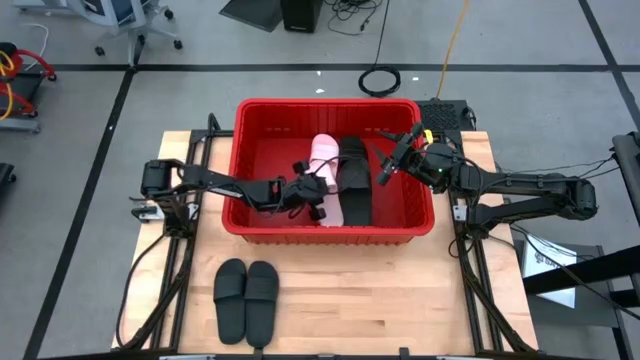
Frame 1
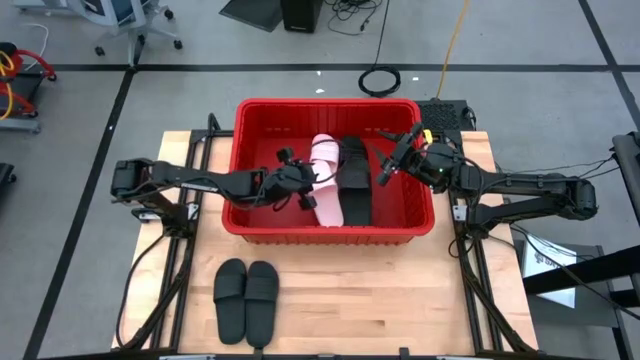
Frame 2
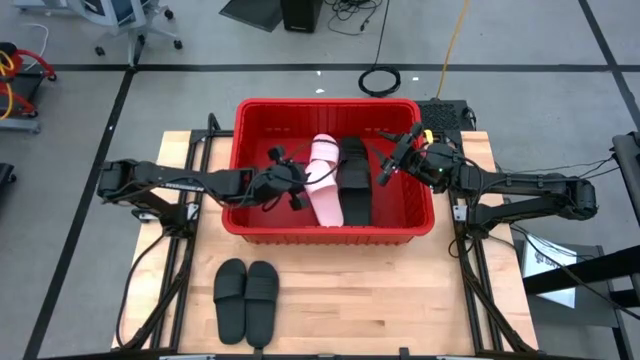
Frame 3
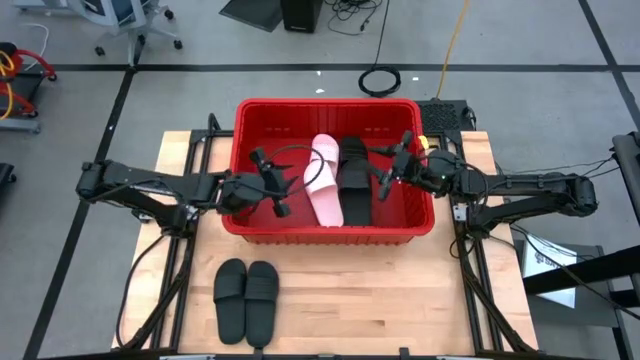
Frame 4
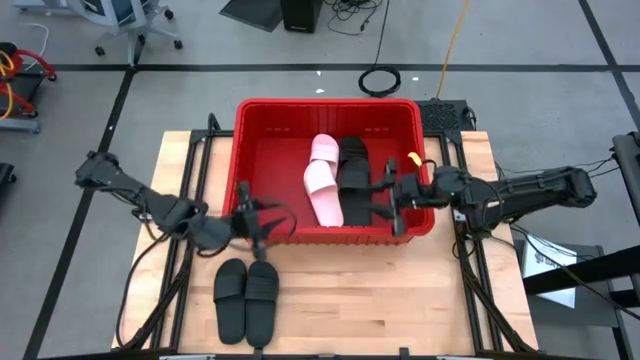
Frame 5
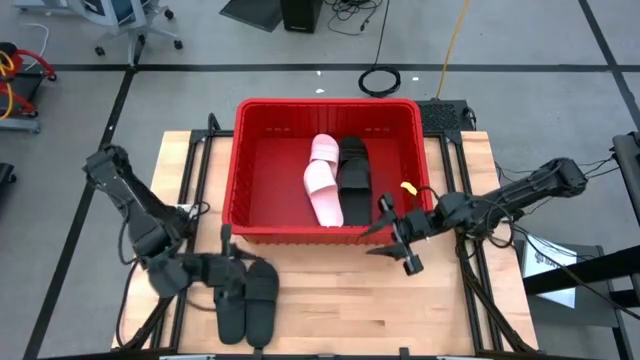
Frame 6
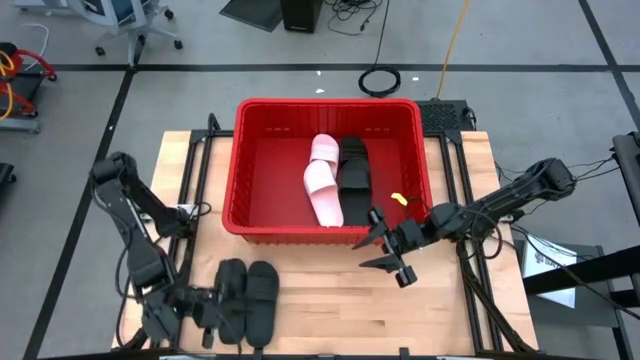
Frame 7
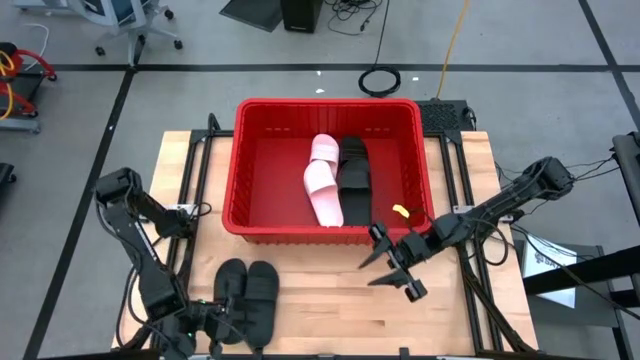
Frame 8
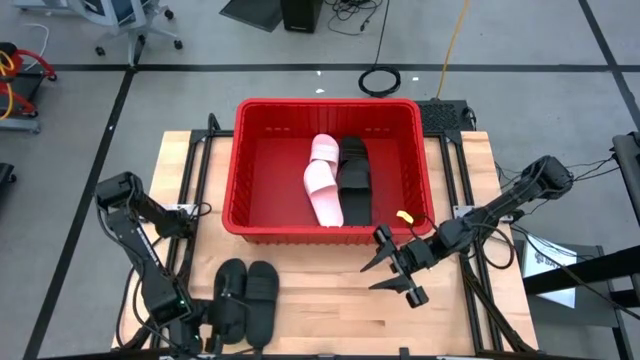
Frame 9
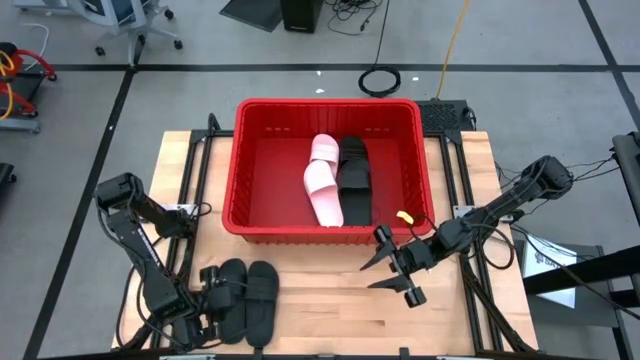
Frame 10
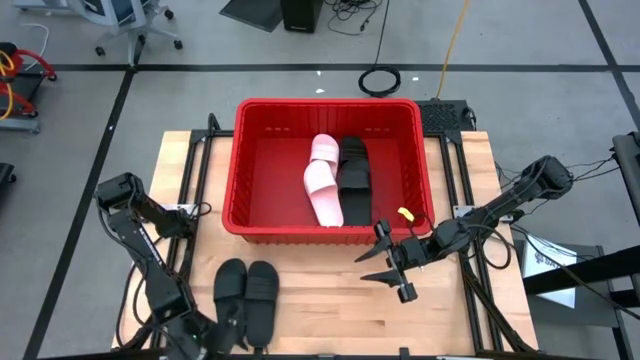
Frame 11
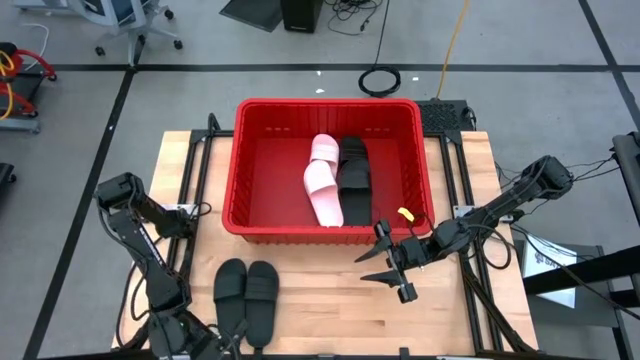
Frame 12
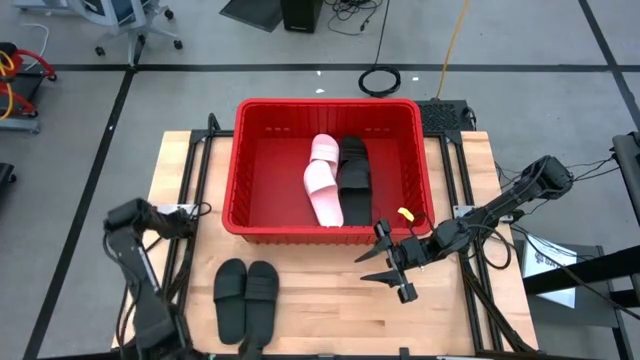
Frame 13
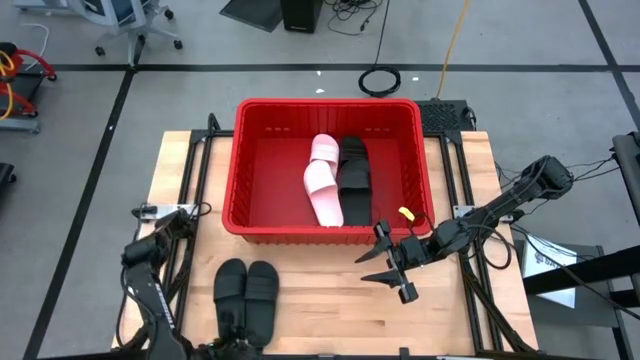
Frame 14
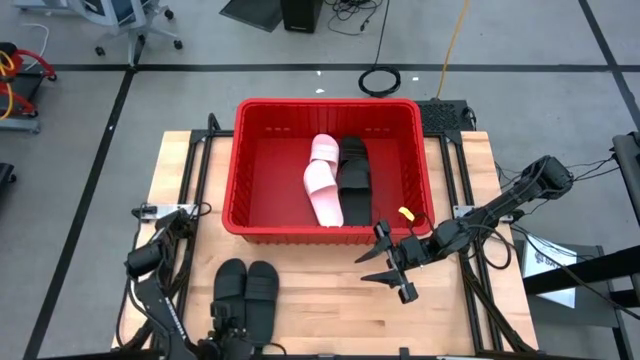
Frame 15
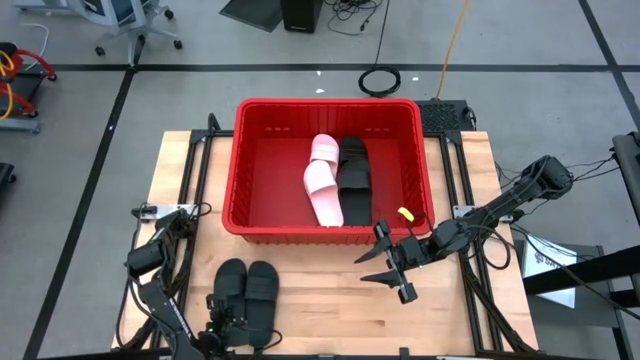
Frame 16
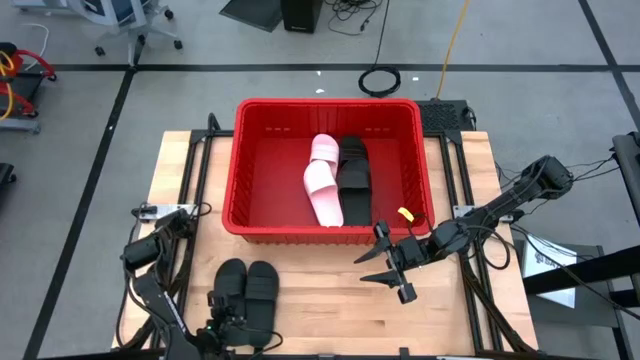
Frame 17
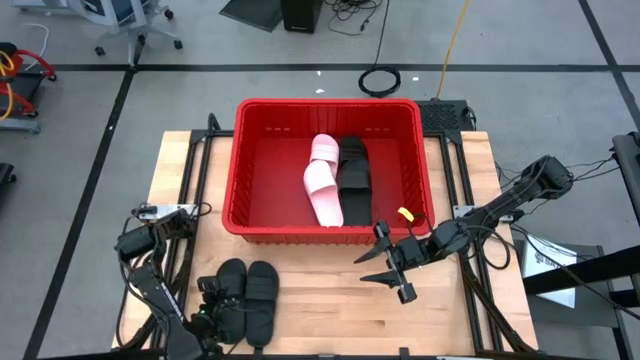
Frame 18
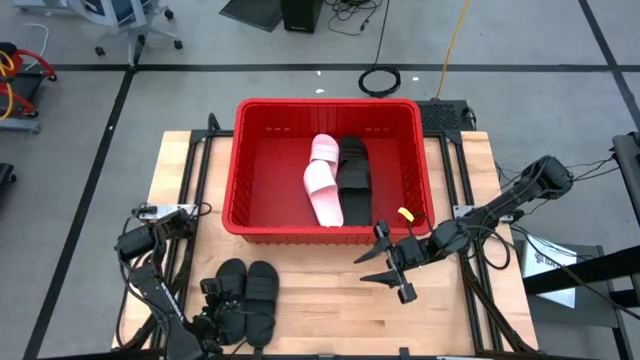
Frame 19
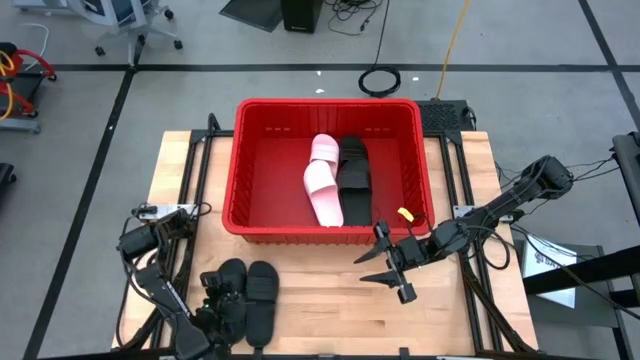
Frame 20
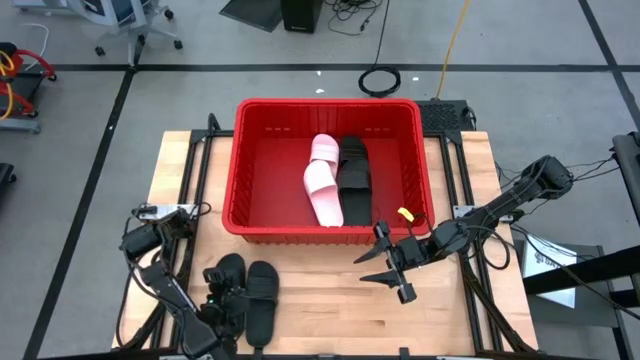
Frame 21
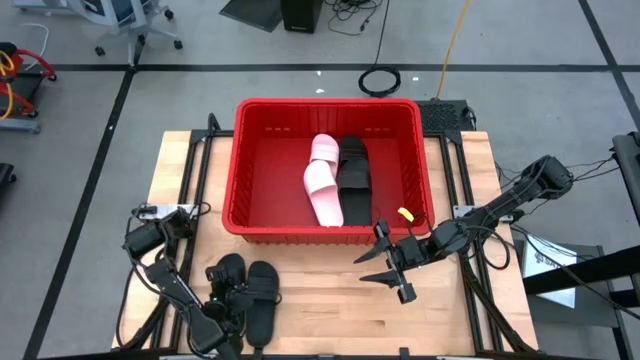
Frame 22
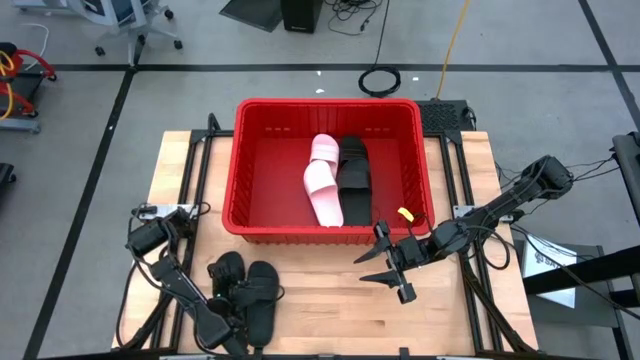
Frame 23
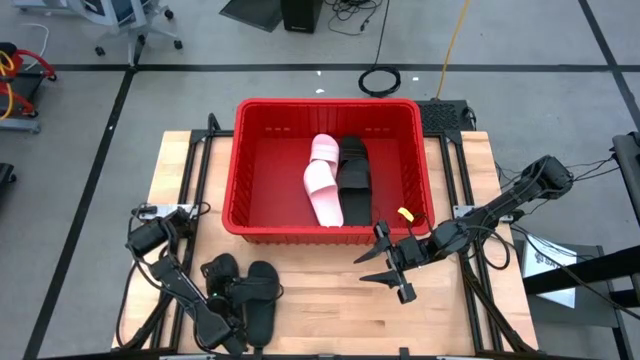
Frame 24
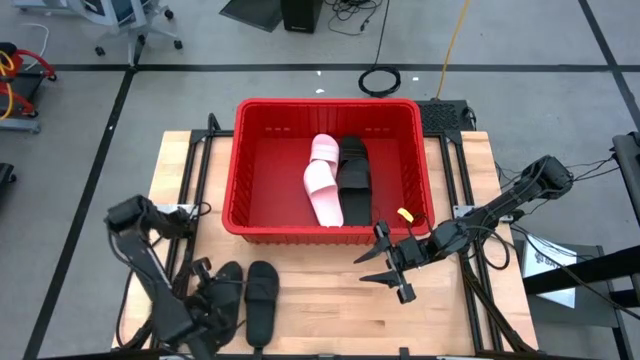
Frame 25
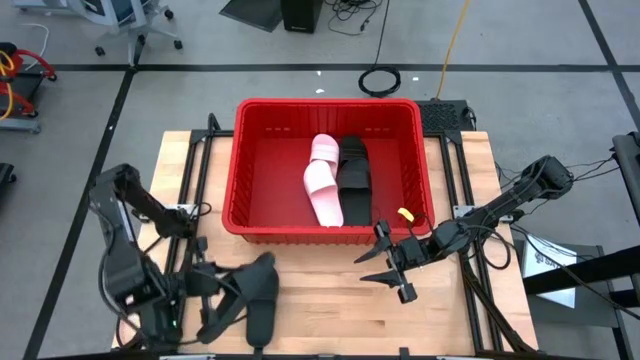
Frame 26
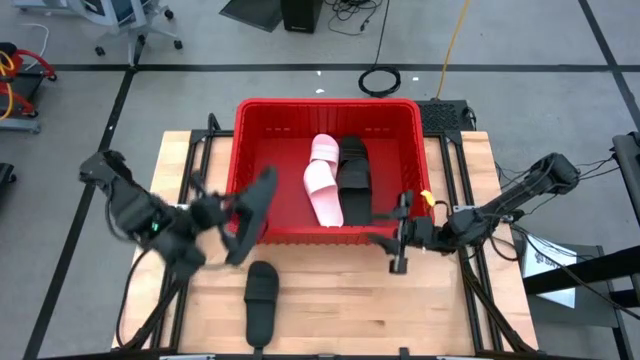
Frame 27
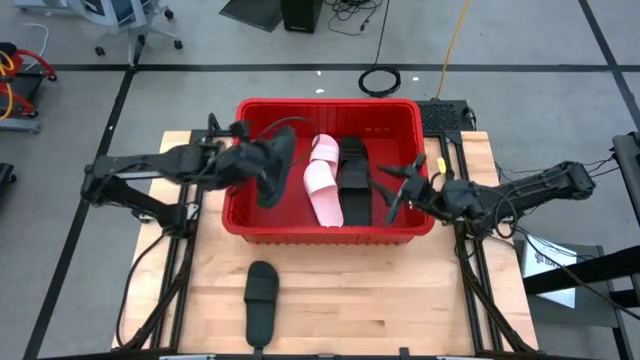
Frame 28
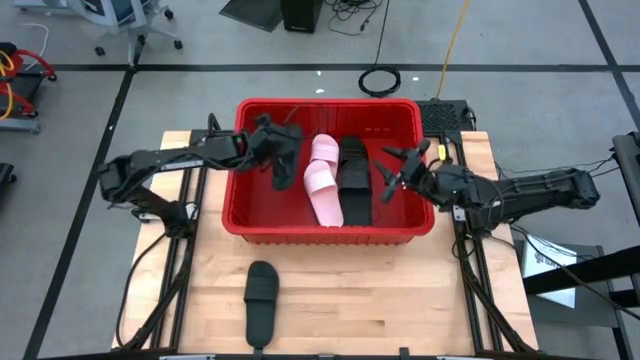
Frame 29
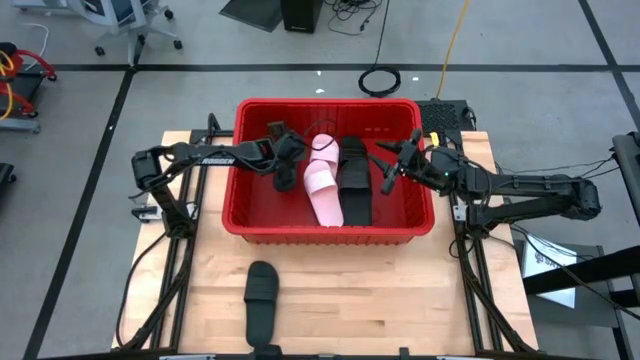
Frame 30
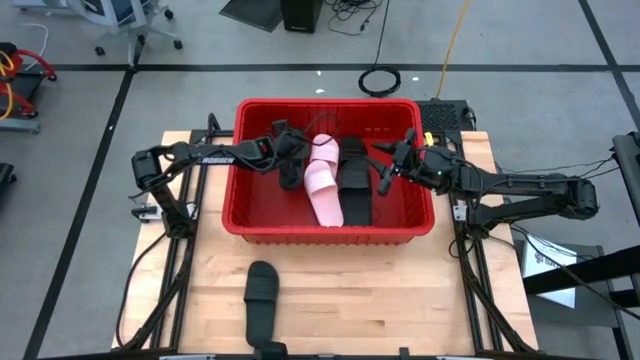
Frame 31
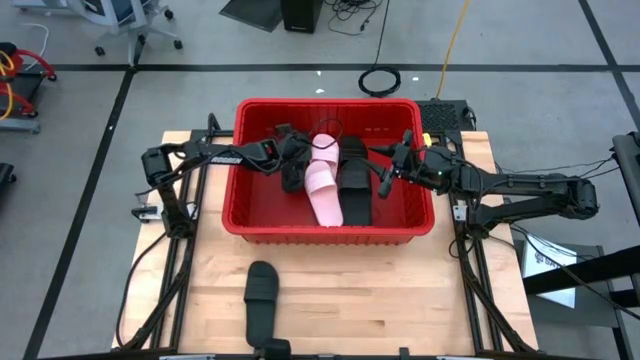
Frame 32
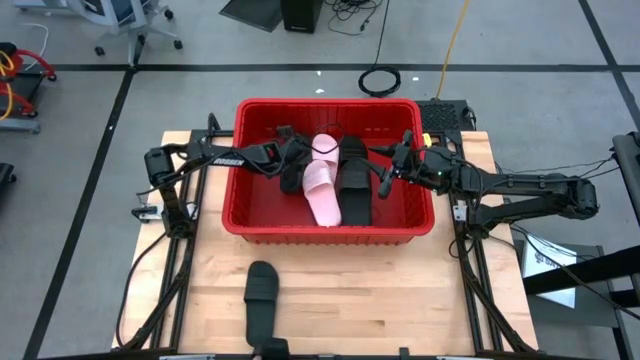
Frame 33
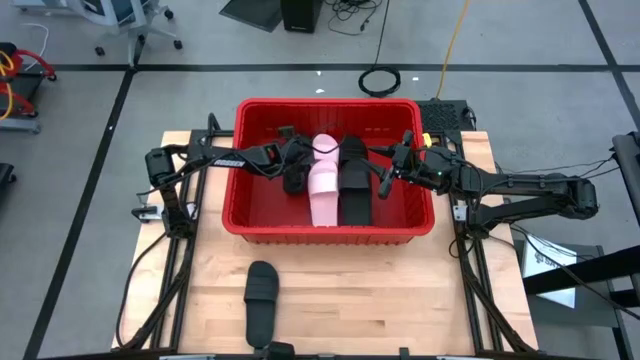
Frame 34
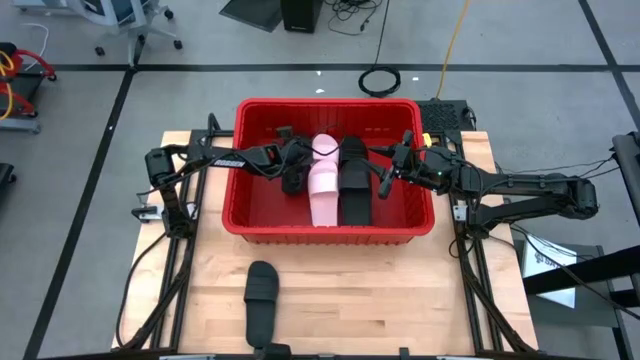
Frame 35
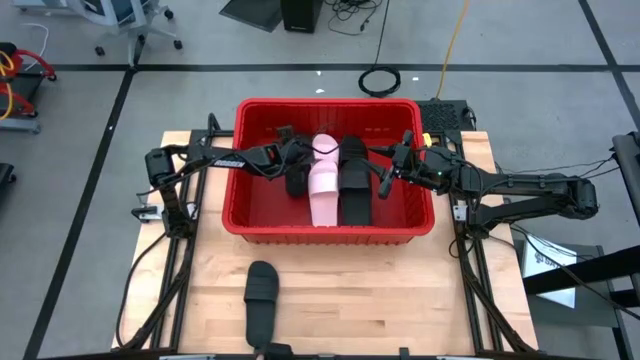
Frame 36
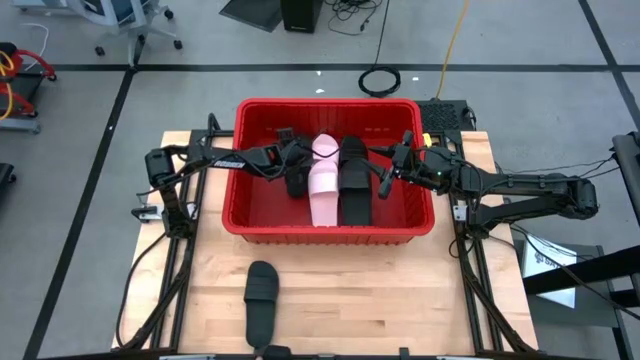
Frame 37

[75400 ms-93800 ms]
Task: Pick and place slides into bin
Put the black slide into the red bin

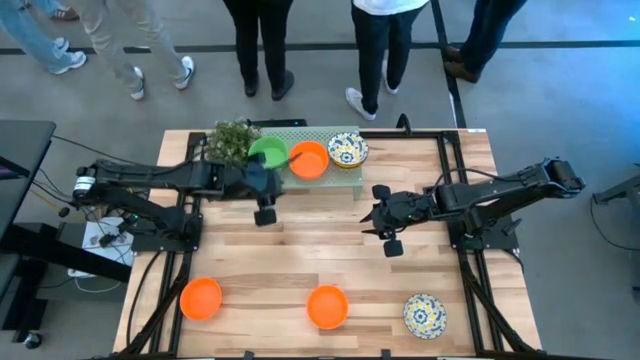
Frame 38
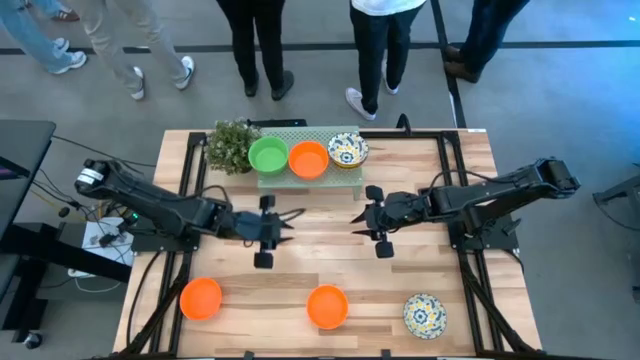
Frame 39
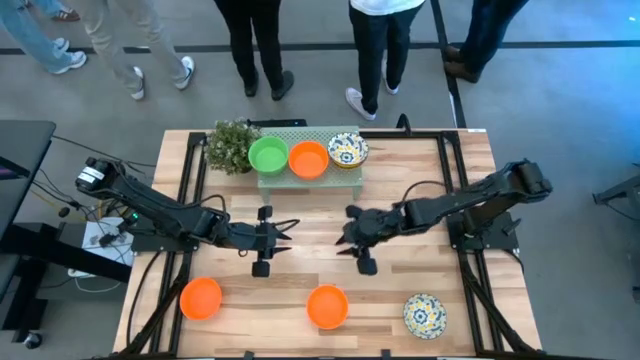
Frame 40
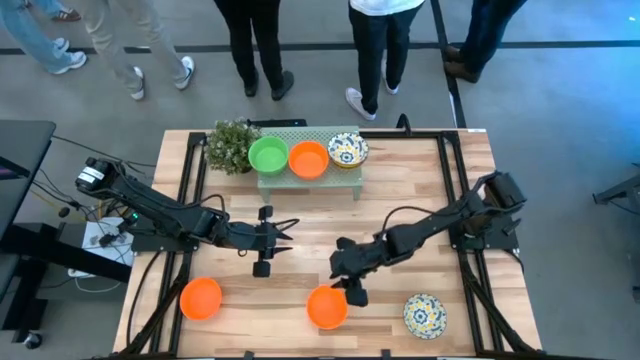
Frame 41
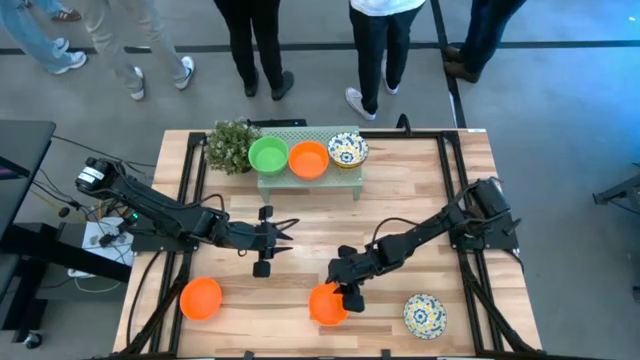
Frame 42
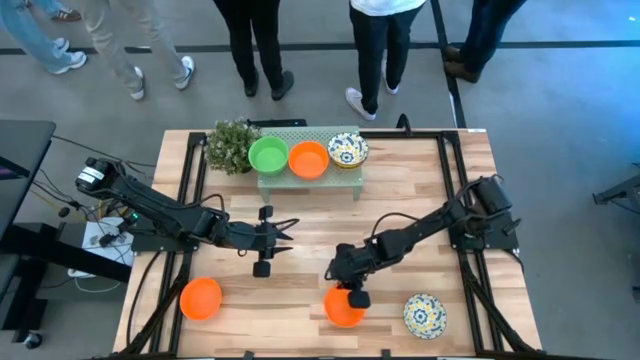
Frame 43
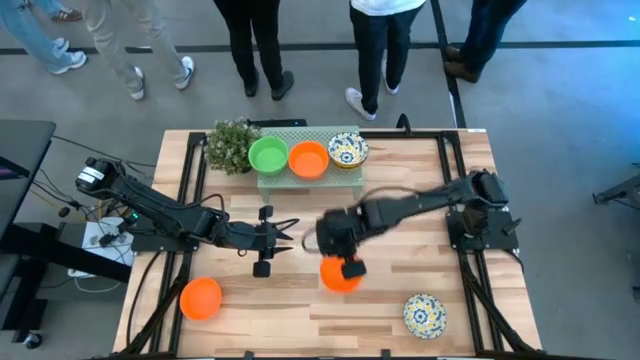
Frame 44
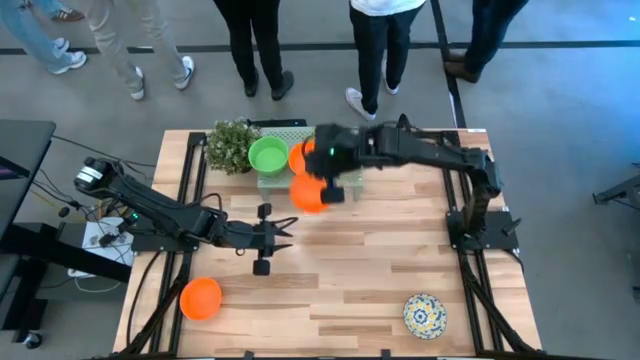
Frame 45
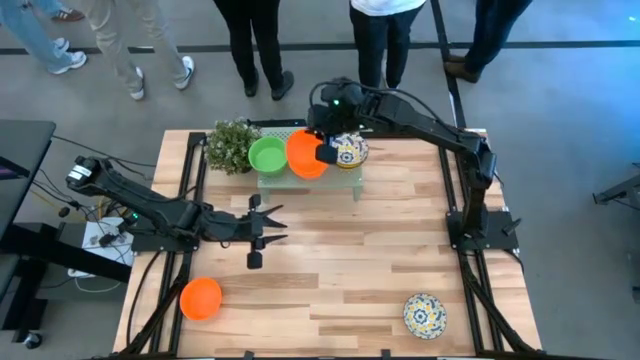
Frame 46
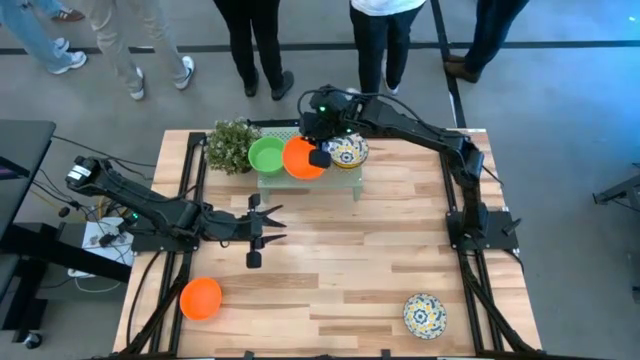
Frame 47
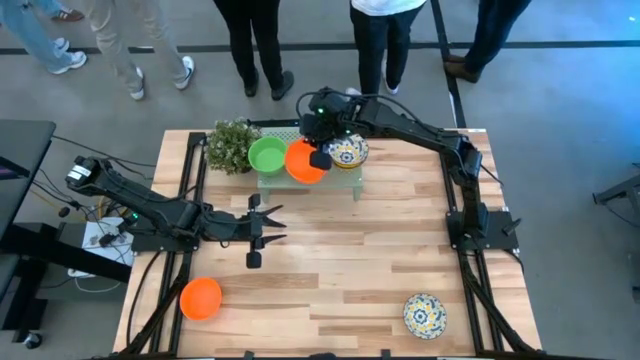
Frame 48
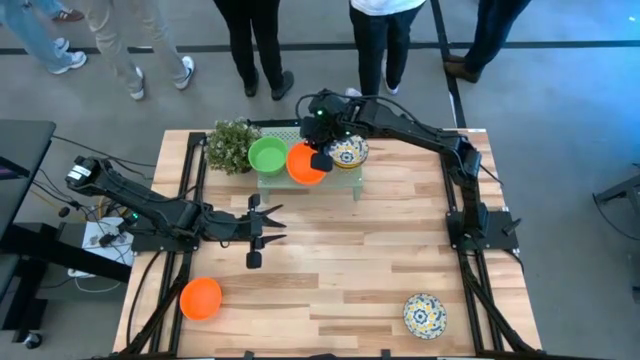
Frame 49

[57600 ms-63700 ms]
Task: Pick & Place Mini bowls
Stack the orange bowl on top of the orange bowl on the shelf
